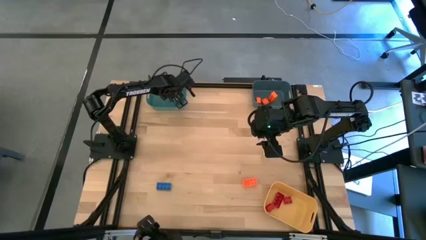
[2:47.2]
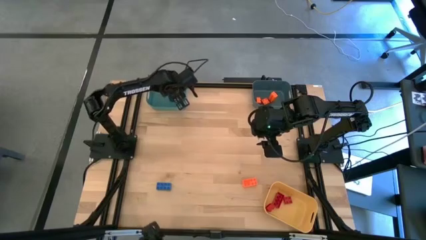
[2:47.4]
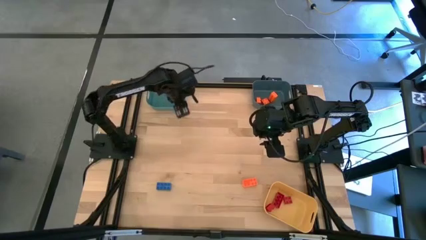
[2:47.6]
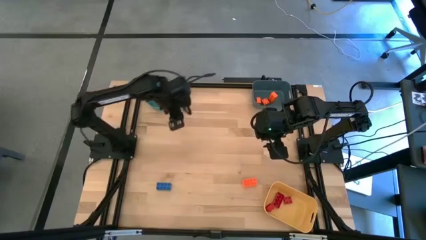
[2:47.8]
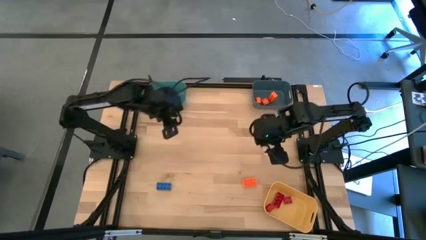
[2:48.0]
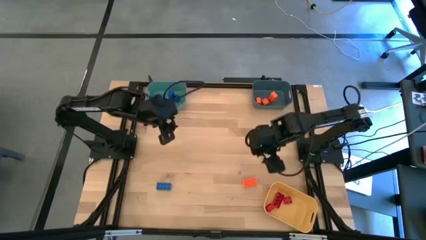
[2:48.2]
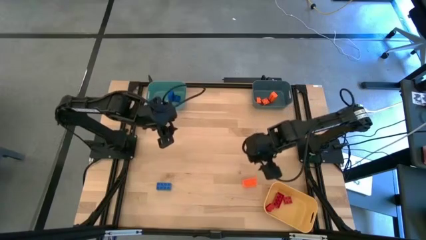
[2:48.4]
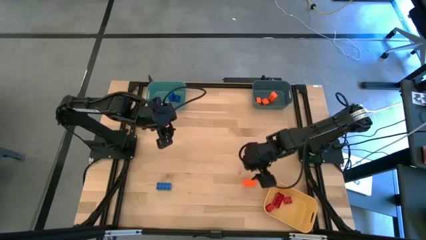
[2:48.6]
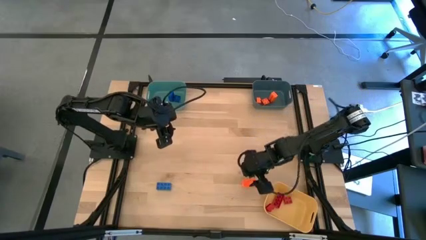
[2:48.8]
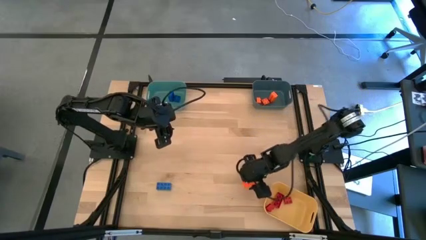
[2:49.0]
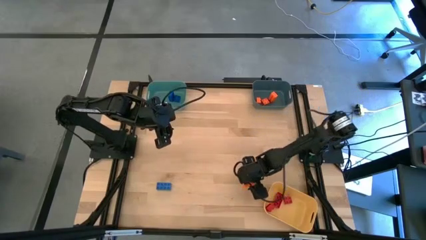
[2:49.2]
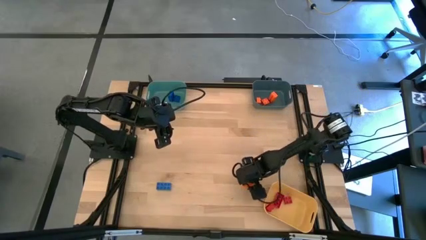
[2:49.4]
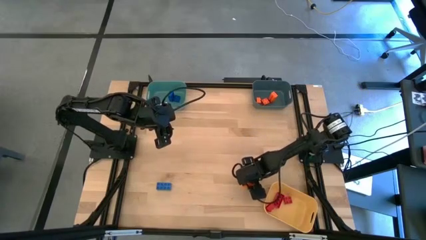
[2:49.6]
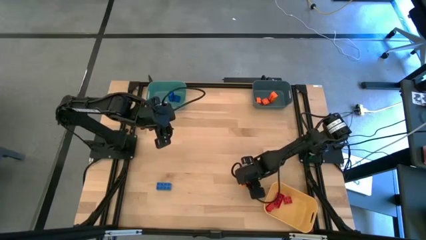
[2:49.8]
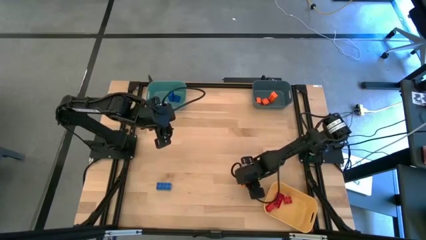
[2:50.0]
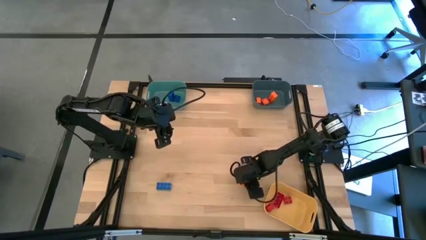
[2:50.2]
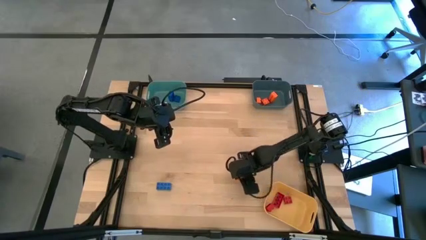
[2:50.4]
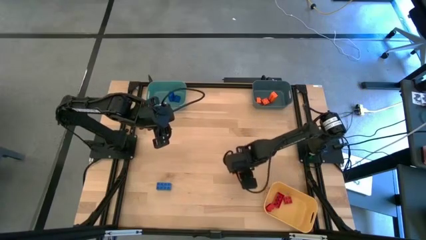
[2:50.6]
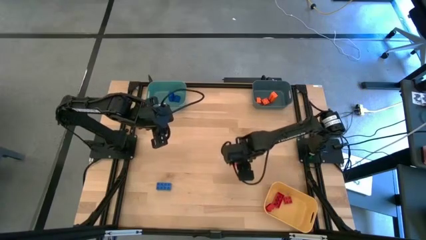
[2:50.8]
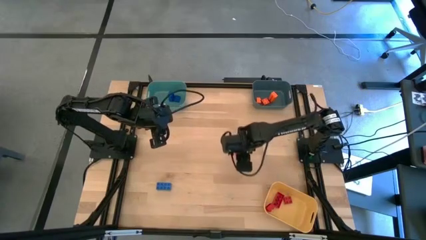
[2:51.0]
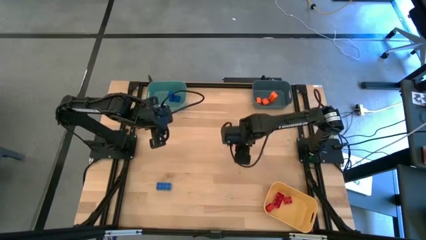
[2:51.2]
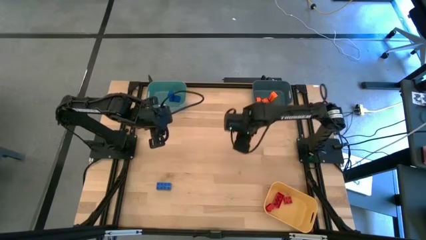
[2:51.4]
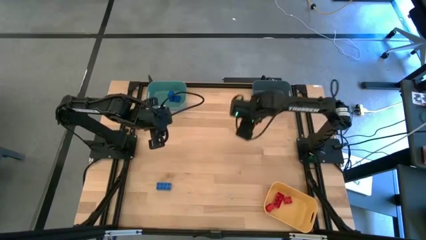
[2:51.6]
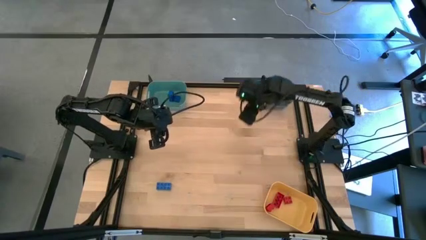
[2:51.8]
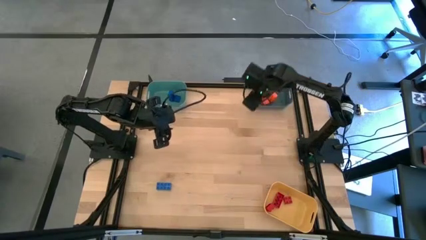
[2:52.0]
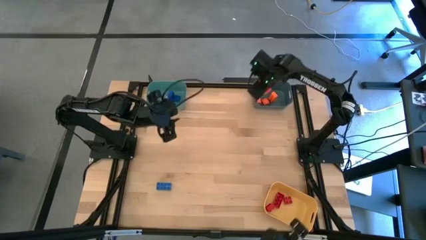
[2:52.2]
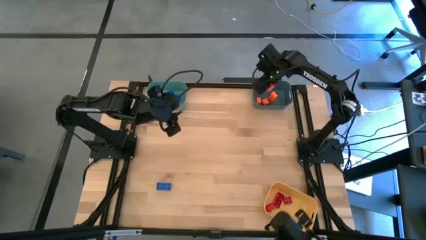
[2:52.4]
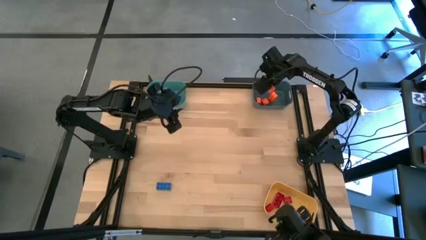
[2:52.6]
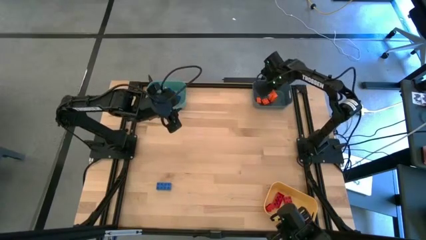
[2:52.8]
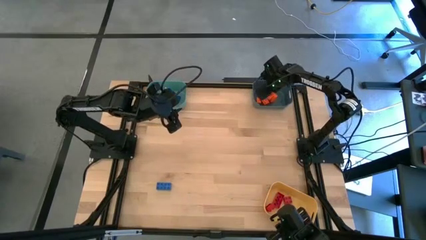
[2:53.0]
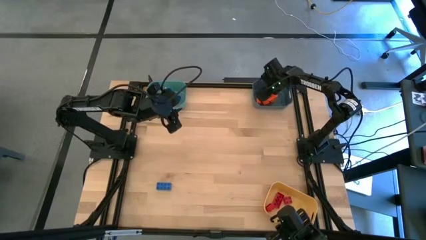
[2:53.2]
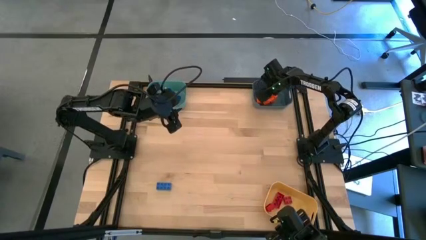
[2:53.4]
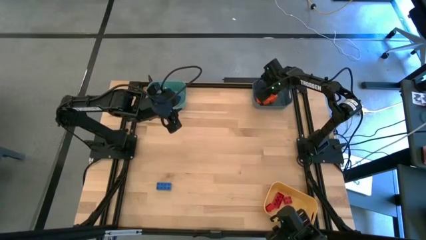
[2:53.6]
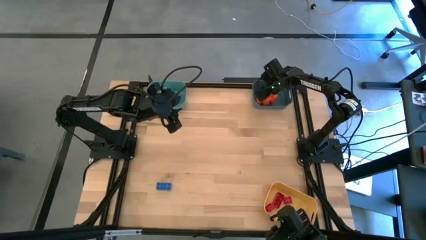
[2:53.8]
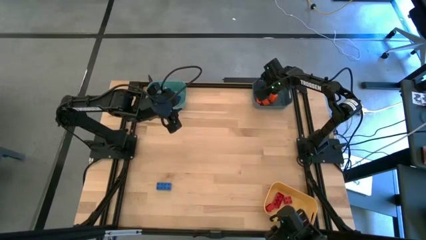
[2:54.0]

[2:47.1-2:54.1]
Task: Sort & place blocks by color
Put the orange game piece into the dark blue bin

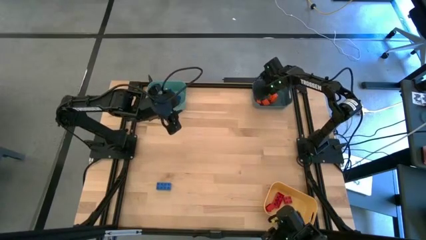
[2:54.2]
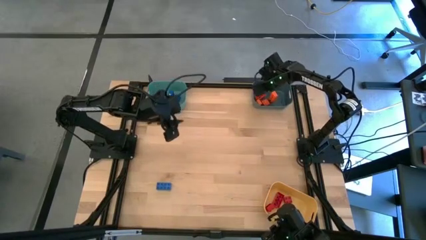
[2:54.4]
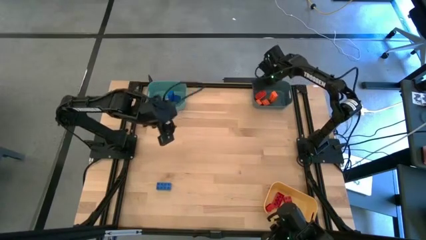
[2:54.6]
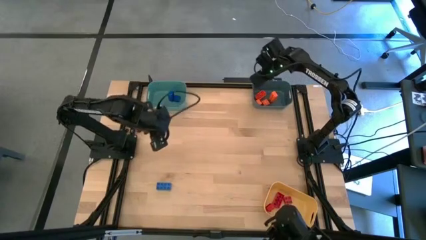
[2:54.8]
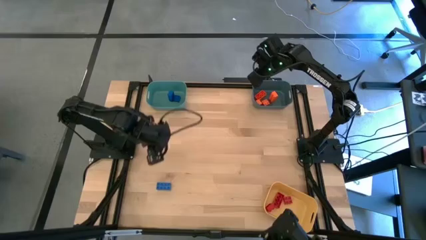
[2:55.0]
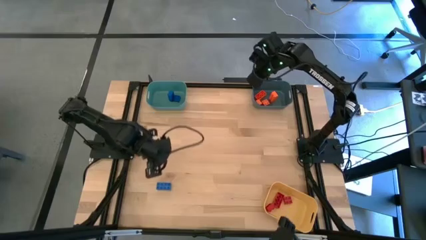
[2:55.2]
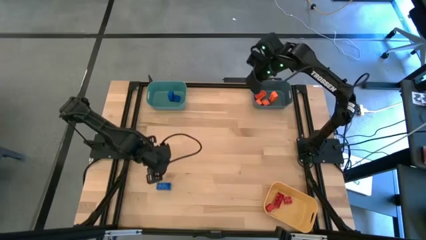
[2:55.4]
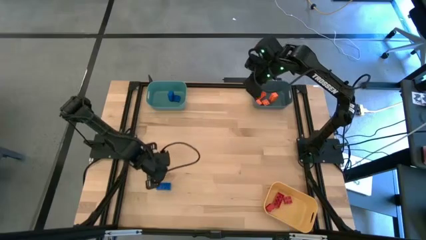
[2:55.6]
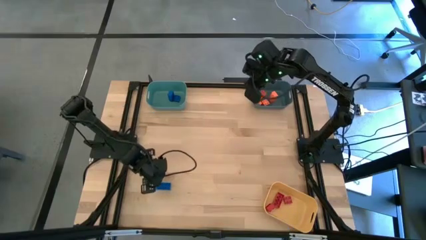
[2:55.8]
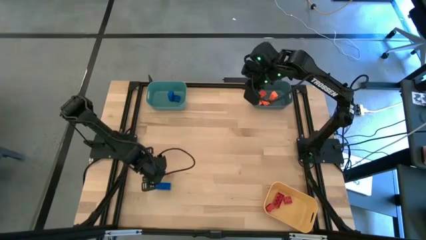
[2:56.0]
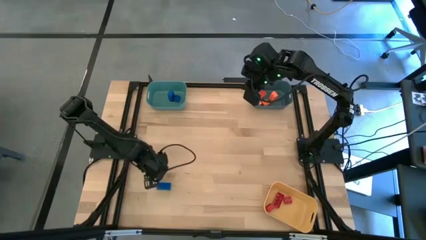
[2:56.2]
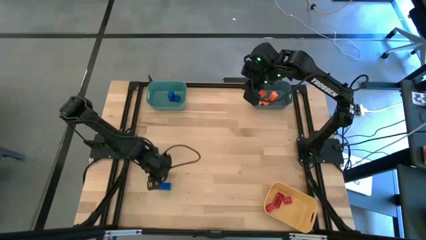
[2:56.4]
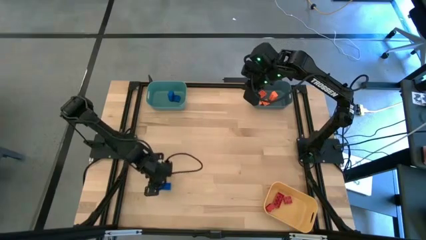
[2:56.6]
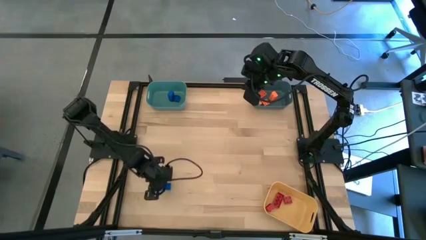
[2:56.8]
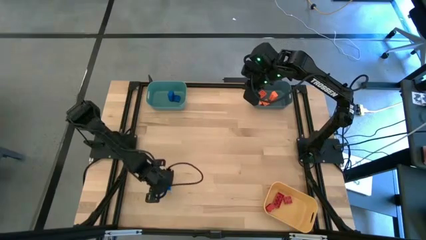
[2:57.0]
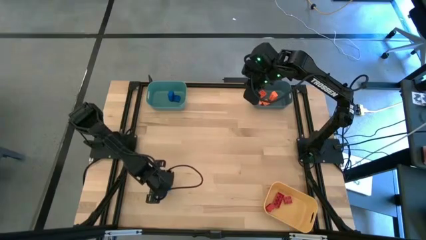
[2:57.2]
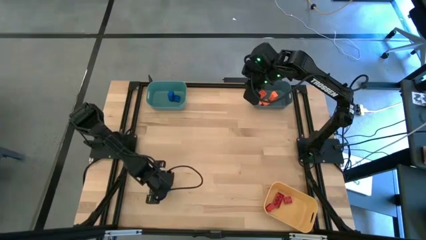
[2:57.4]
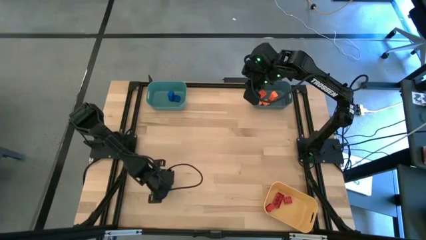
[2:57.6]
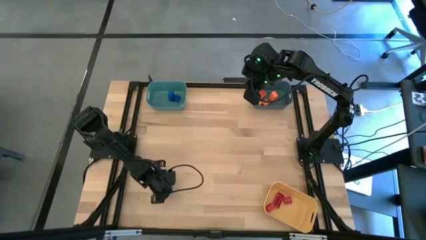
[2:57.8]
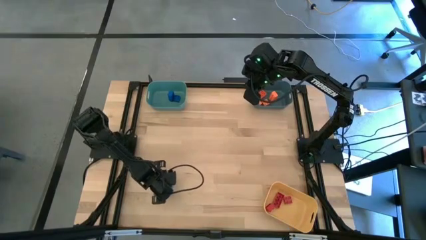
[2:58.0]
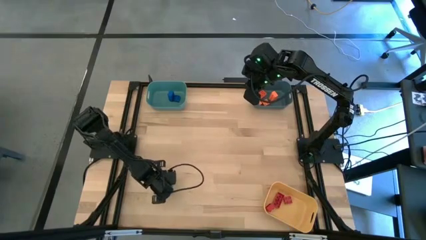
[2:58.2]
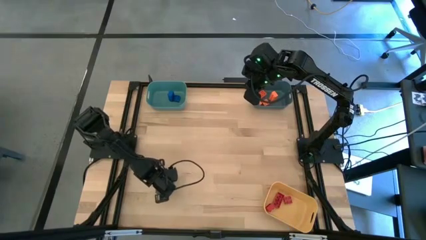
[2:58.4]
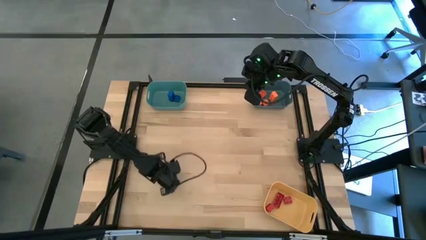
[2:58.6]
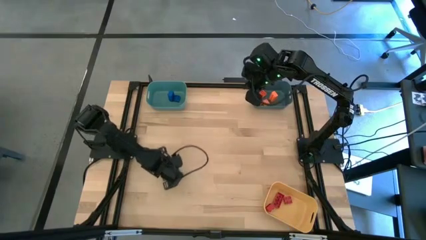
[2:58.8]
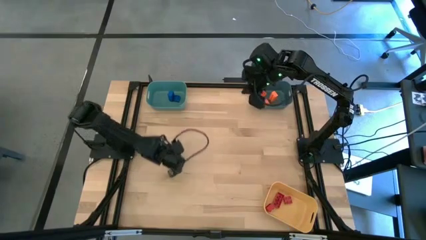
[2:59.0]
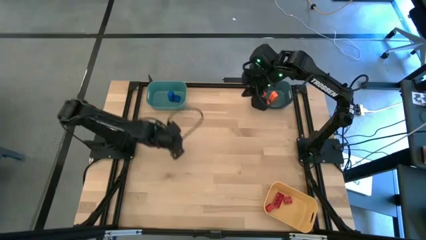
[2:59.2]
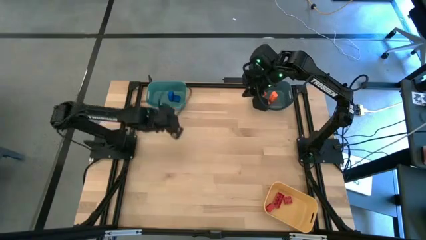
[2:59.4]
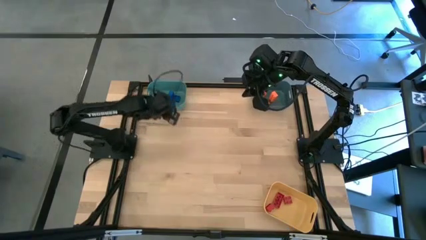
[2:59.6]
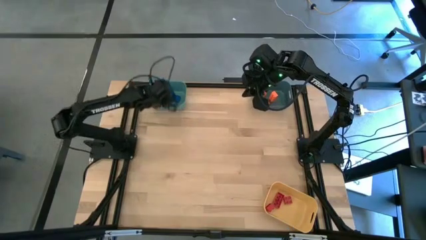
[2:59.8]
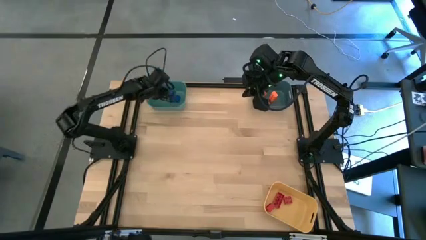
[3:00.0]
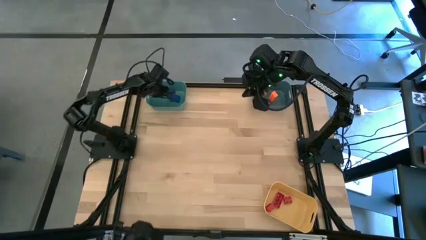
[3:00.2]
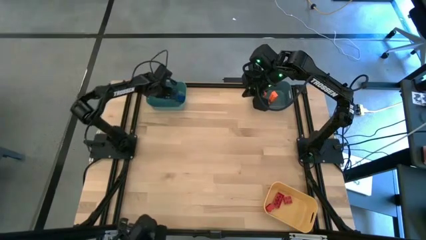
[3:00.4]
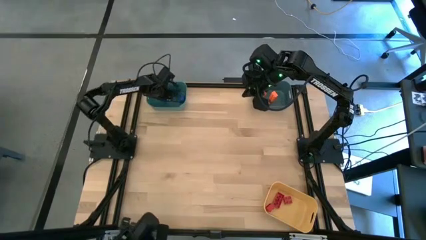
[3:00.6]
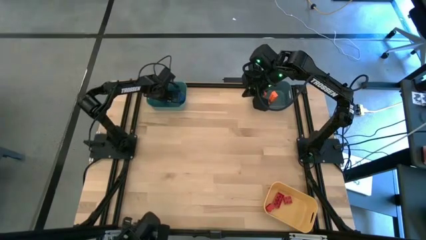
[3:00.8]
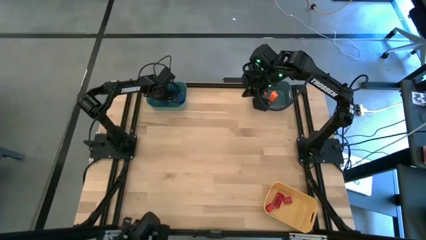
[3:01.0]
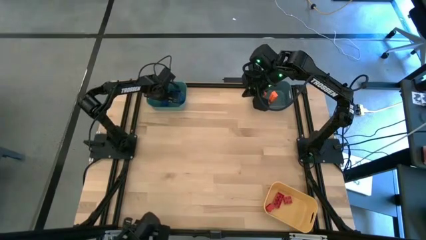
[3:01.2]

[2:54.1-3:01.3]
Put the blue game piece into the green bin

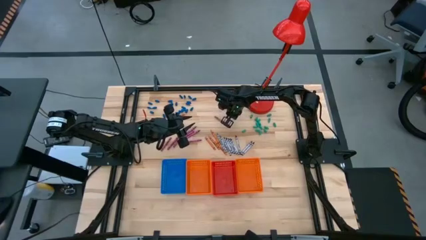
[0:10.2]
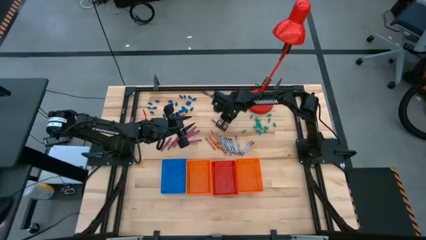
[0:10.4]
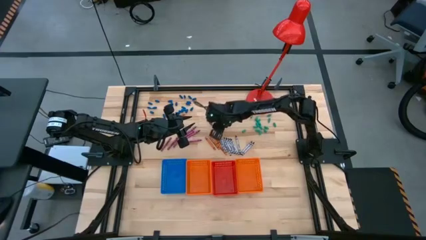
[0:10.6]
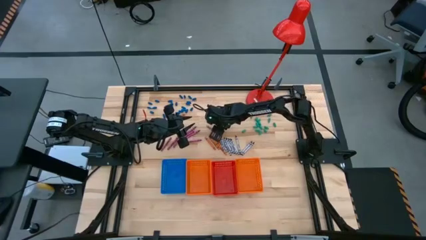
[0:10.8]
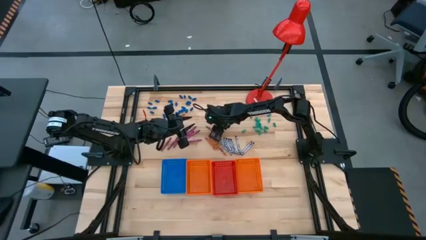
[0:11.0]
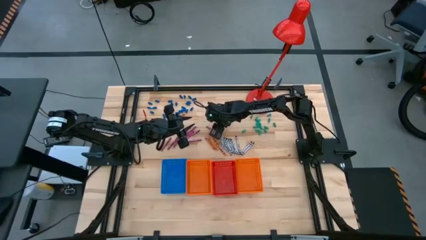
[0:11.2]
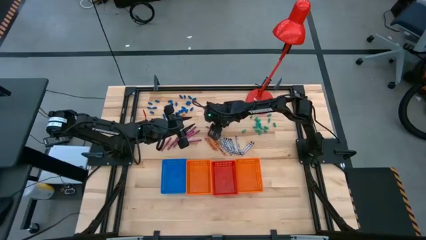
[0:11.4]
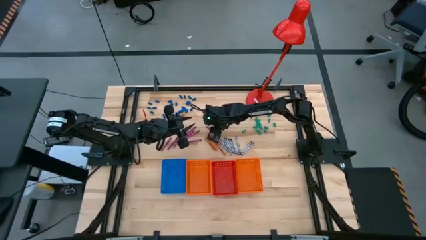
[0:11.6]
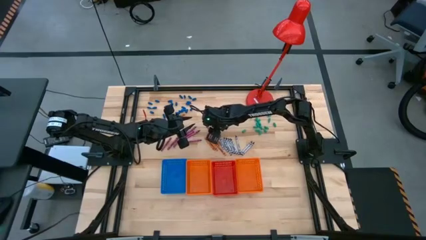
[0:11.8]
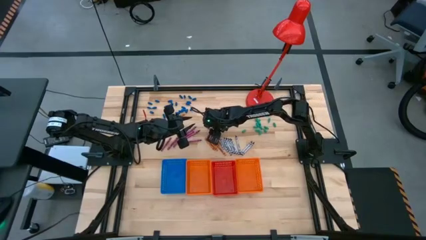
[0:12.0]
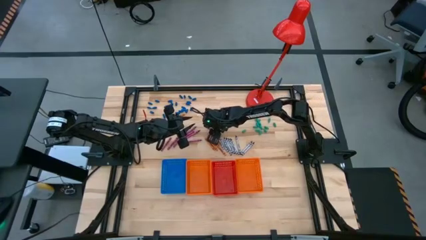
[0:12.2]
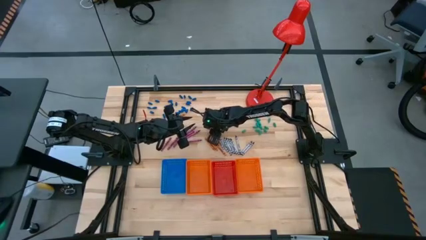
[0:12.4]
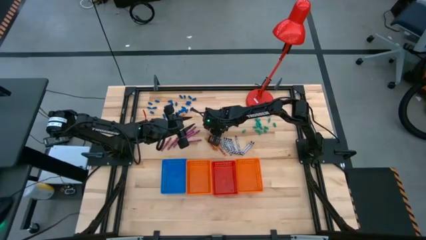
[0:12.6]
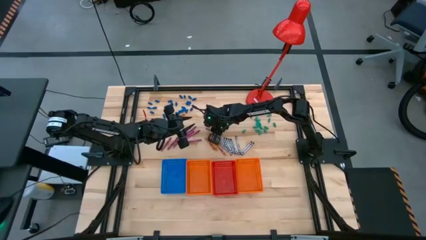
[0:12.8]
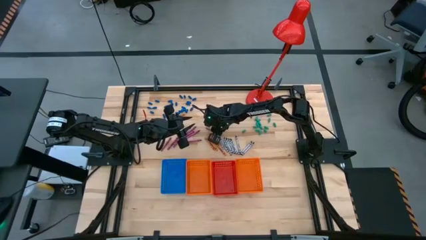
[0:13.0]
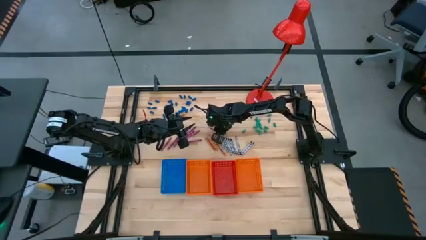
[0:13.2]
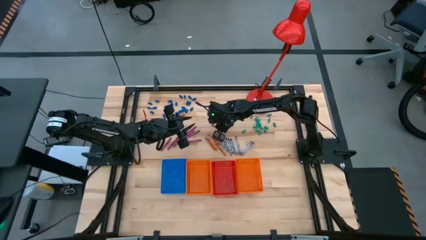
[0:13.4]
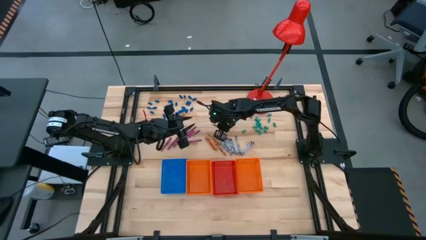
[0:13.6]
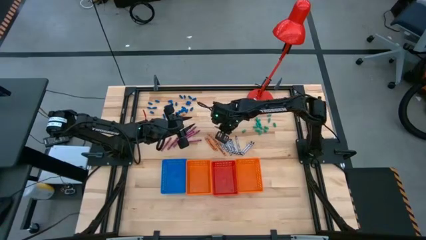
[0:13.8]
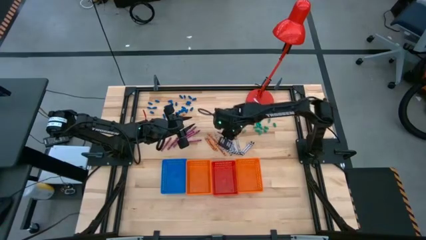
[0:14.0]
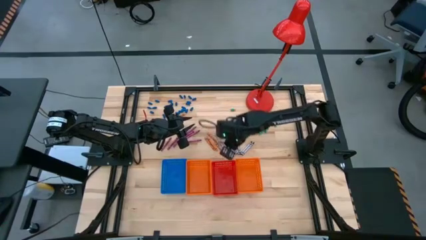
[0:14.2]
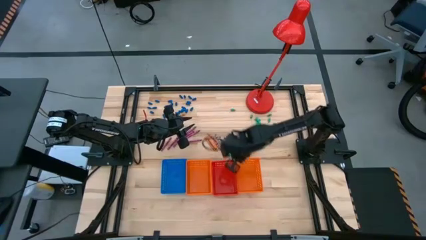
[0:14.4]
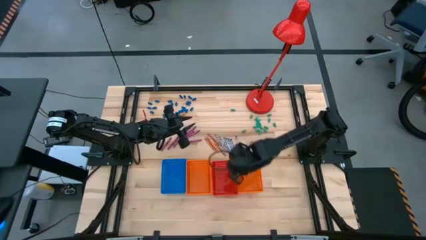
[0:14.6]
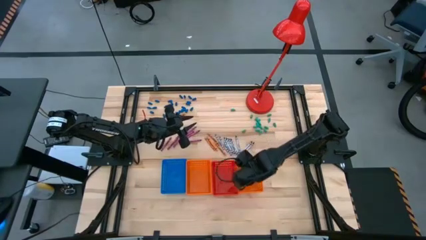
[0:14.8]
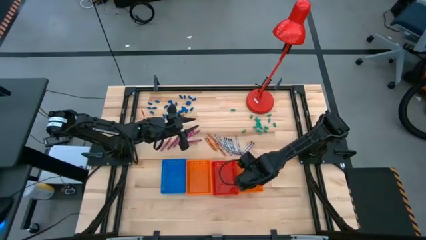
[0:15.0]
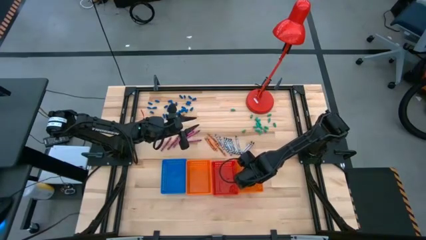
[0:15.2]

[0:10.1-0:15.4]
Task: Sort crayons
Put the red crayon into the right orange bin
